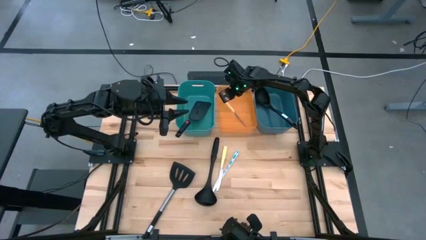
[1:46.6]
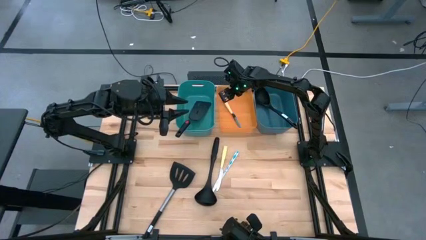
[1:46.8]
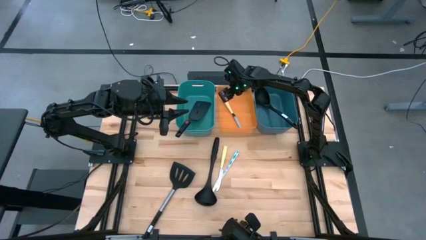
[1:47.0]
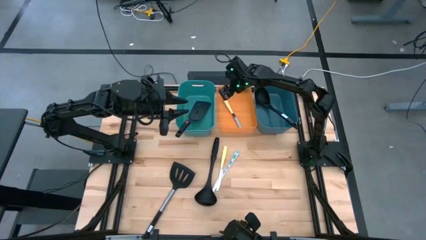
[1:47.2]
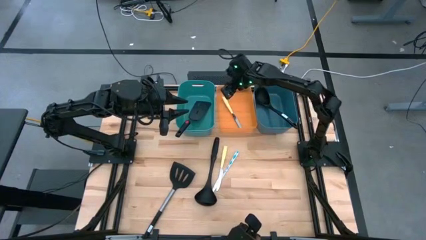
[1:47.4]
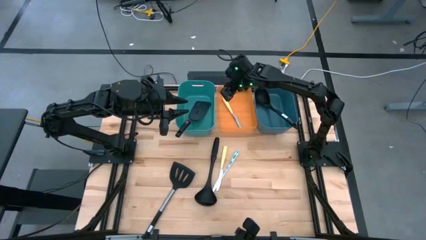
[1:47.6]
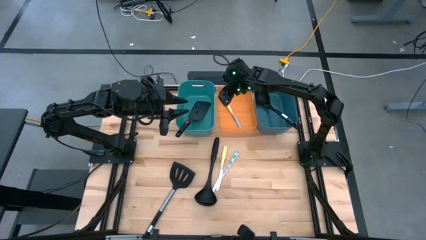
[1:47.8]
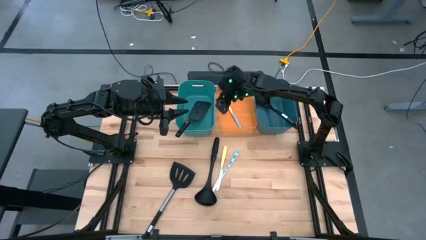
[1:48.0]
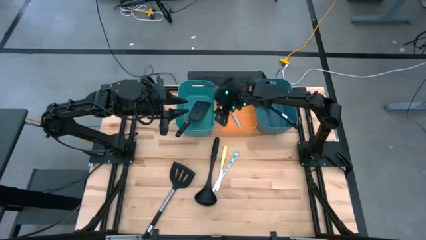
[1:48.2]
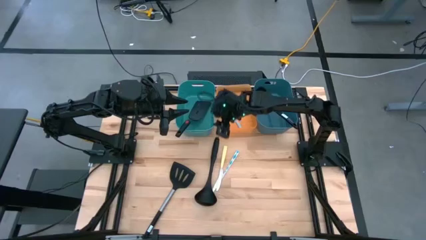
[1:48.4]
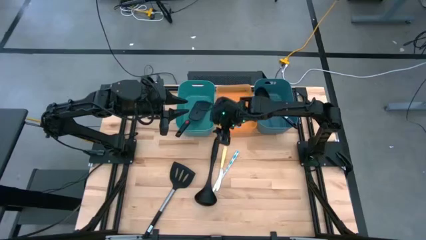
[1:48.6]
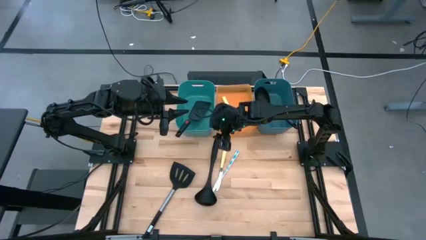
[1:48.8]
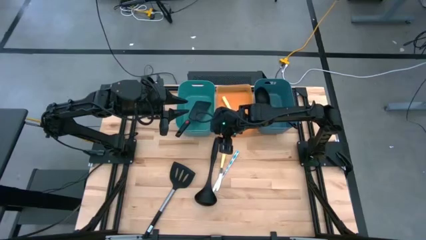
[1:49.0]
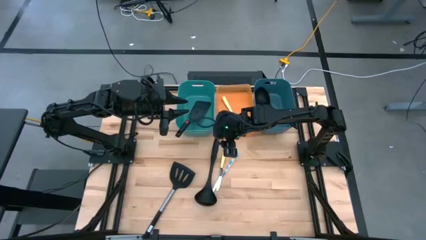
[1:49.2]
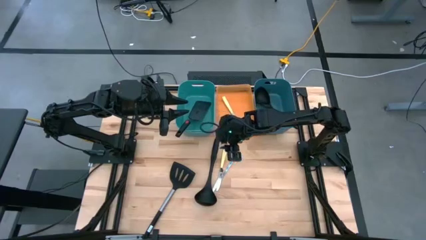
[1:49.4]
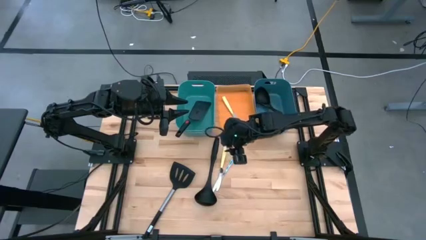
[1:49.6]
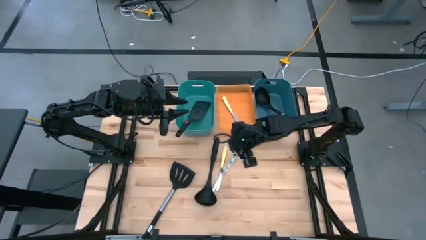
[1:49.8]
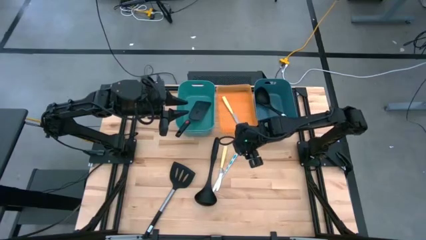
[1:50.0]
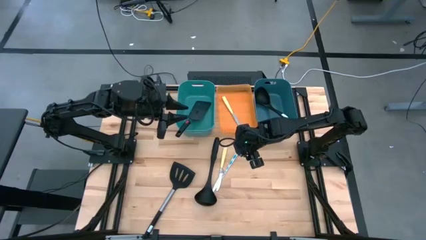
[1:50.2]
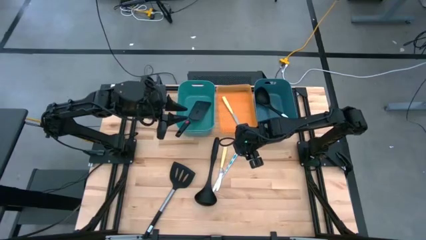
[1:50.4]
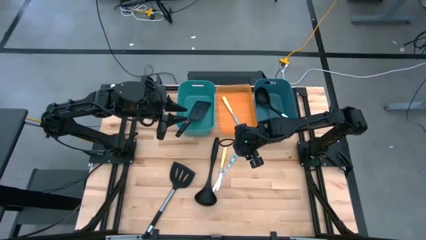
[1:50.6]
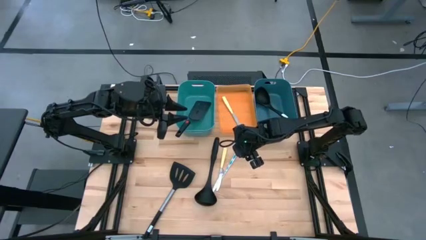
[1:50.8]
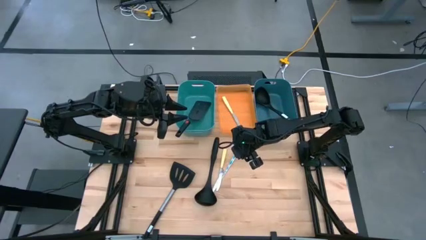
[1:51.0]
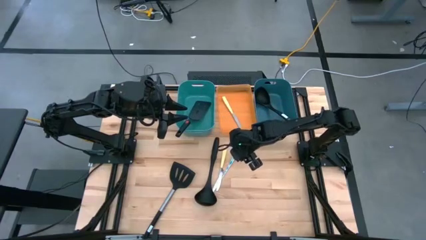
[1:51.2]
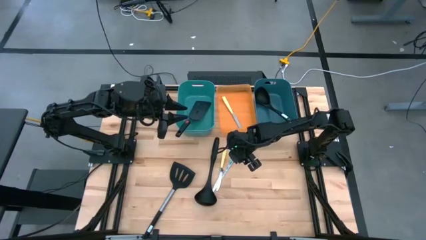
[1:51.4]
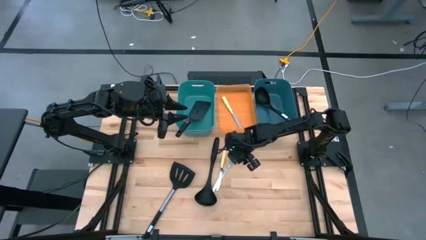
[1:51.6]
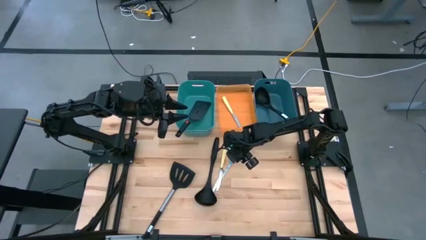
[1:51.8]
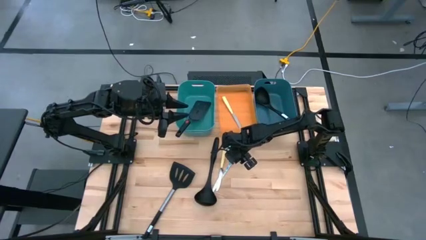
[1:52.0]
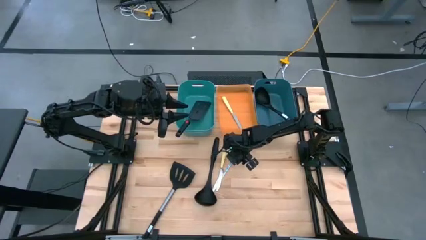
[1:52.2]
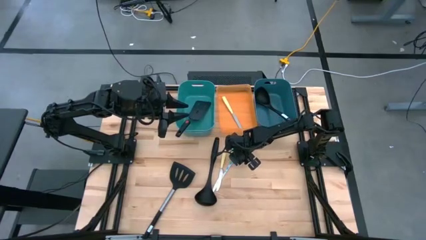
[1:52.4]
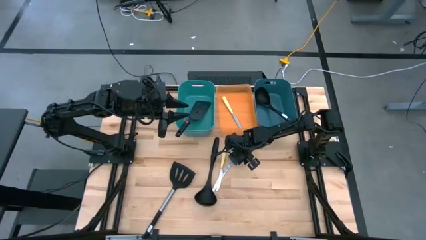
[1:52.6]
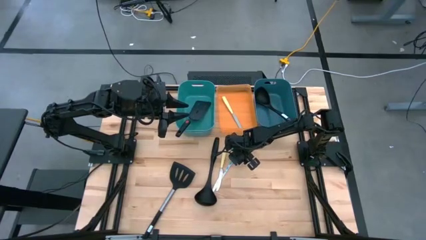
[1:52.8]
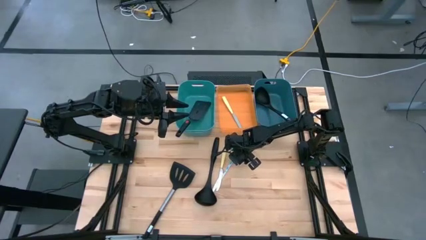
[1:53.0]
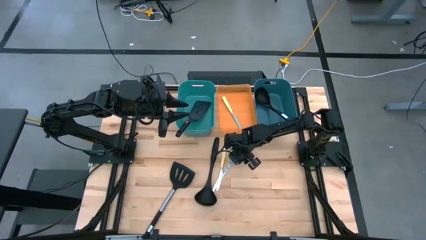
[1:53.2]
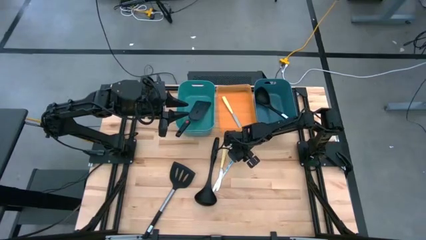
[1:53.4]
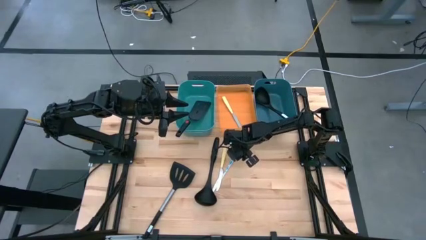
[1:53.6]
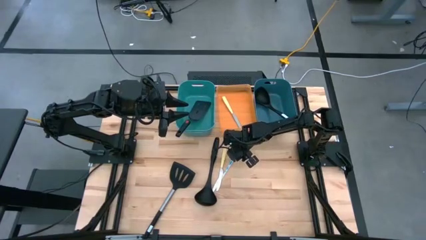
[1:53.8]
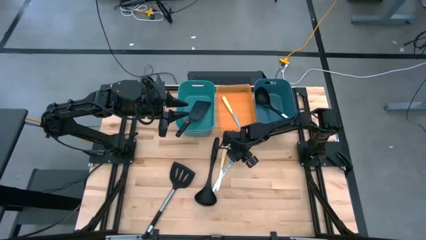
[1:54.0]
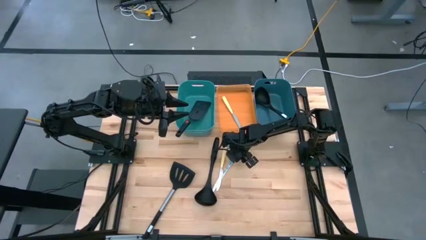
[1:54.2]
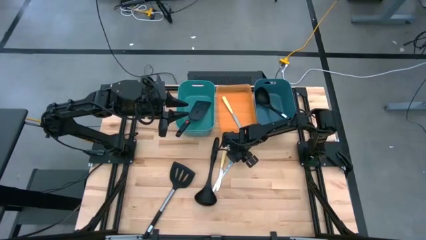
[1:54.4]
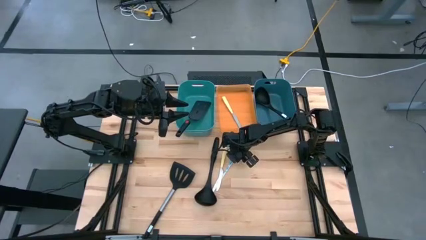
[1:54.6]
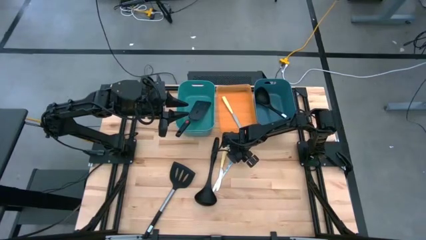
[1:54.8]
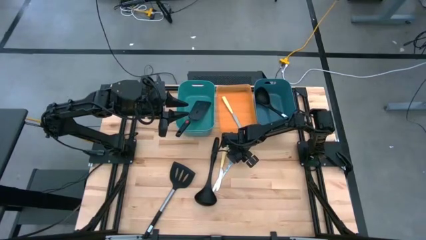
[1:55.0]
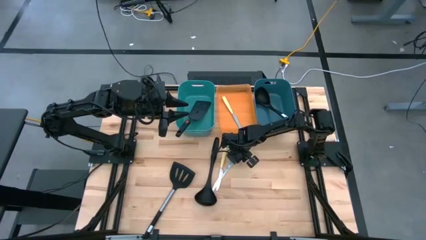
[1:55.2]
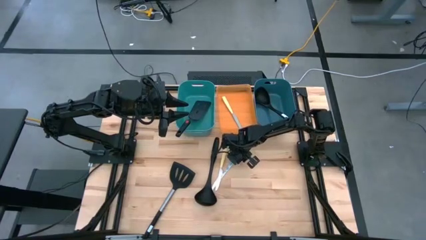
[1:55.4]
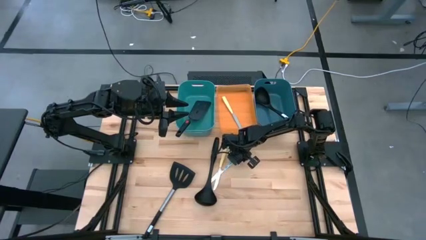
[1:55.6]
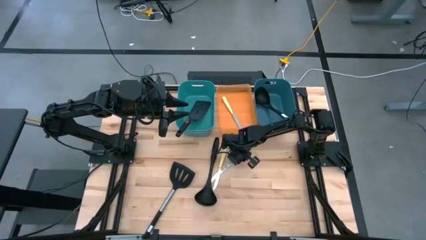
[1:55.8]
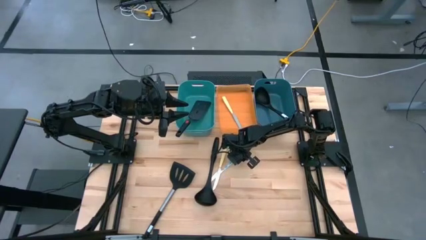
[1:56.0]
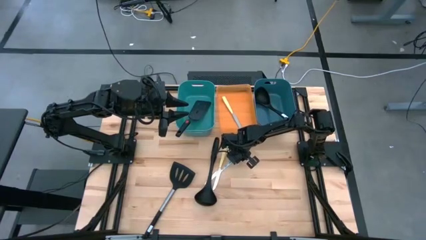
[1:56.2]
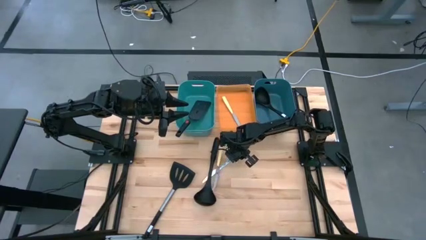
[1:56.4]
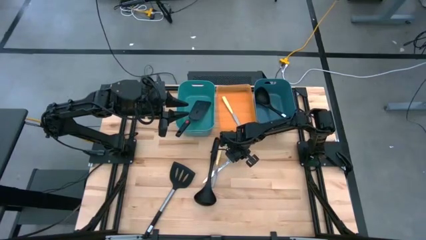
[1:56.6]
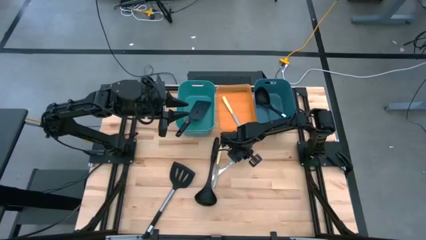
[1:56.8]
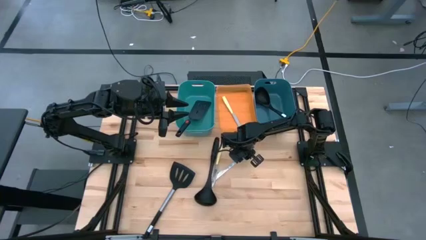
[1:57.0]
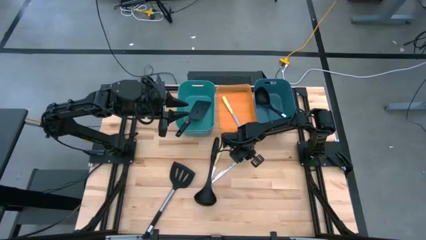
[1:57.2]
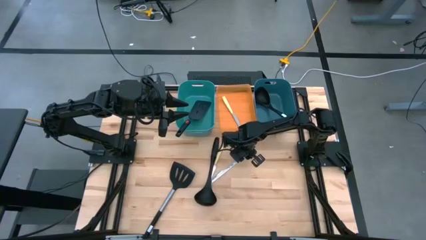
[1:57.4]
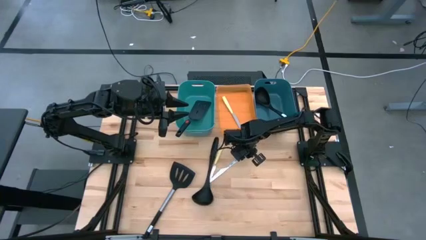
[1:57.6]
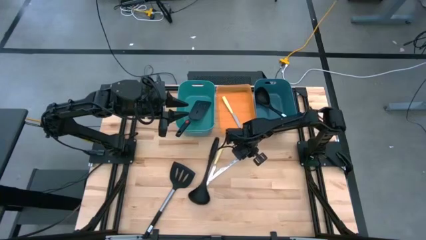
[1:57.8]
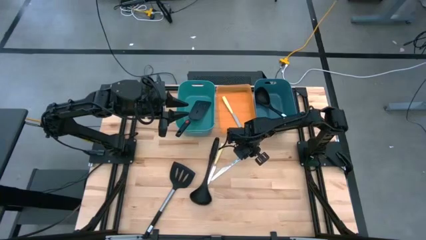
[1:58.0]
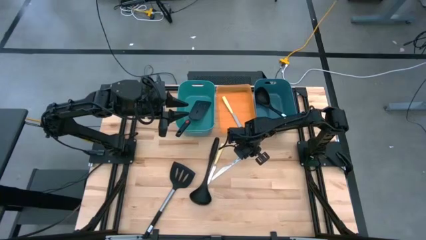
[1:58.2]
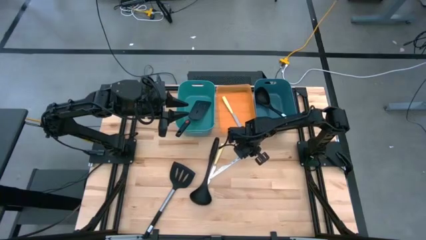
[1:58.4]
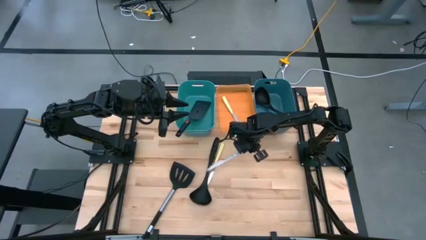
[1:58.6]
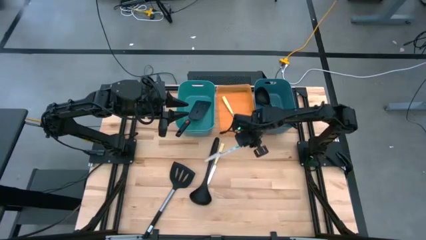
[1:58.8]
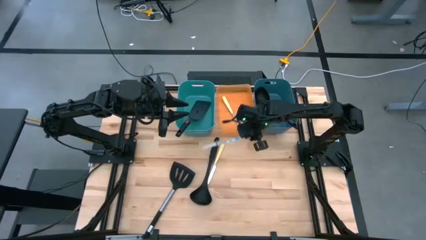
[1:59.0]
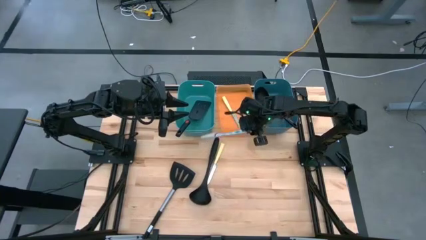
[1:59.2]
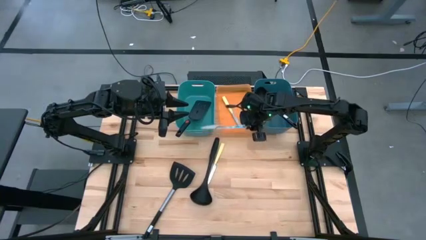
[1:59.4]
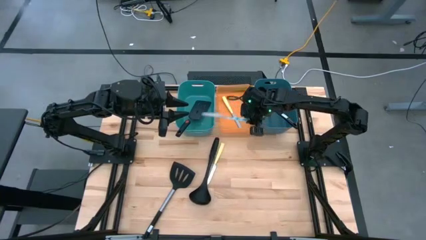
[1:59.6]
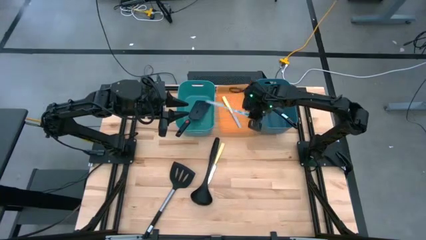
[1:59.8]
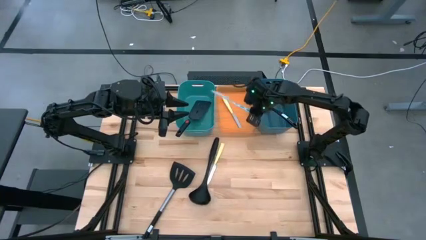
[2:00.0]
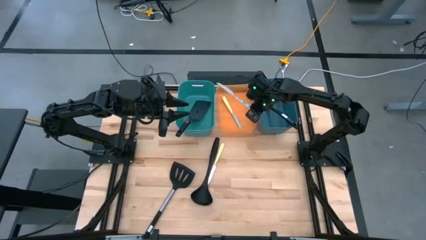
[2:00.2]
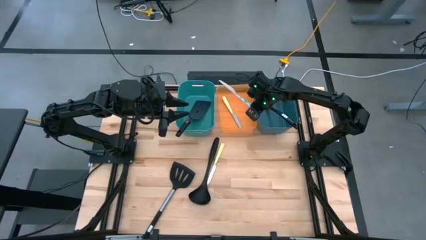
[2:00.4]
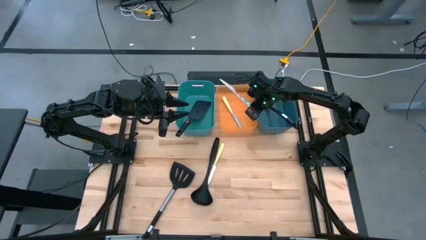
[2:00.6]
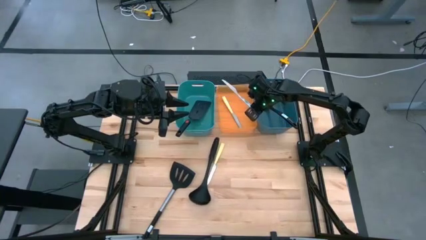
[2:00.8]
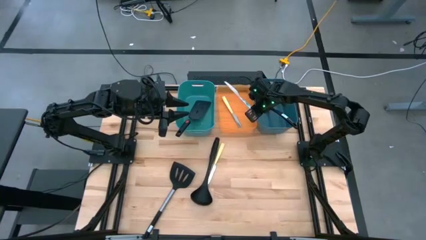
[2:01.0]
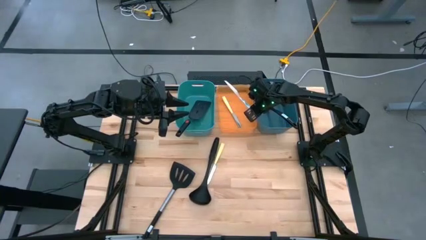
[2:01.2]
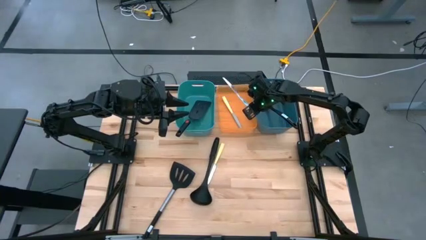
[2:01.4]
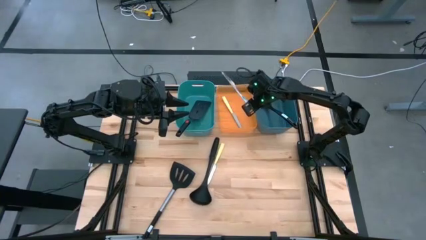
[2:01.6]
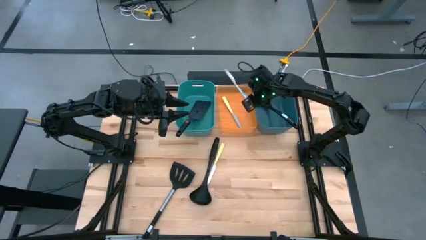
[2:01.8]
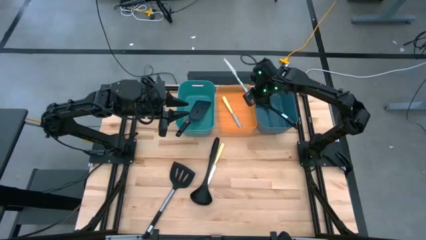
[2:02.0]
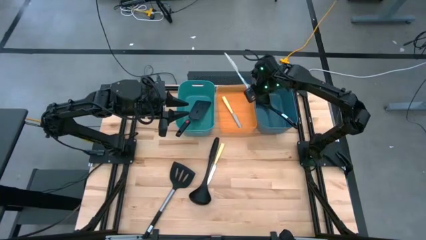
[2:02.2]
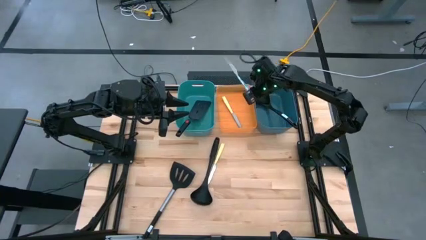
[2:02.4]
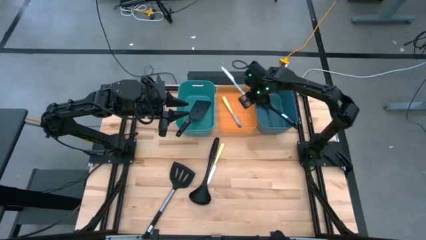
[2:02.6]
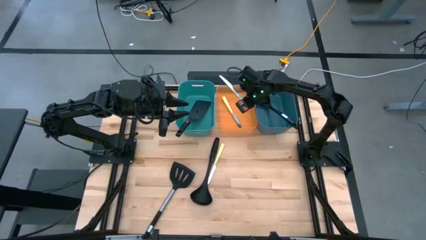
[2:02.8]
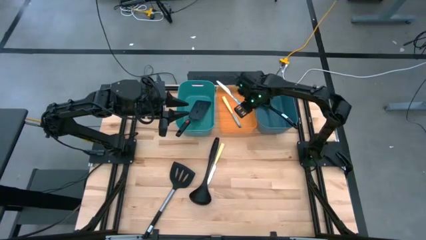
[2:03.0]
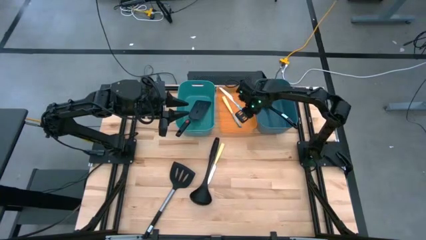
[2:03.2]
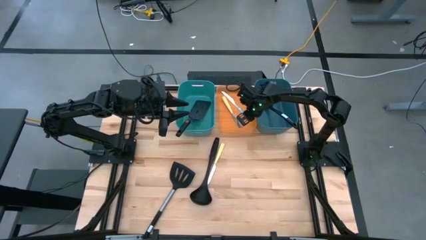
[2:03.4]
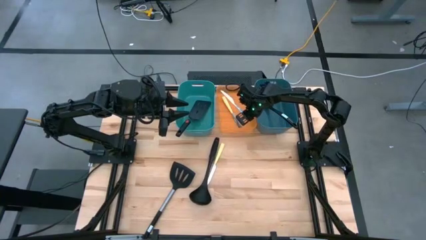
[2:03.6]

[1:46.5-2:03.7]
Task: Pick & Place Kitchen Items
Put the blue table knife into the orange bin
